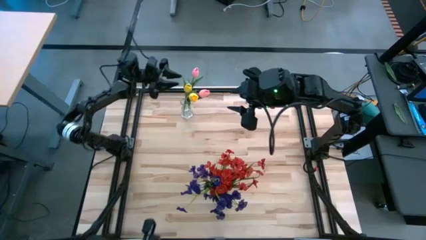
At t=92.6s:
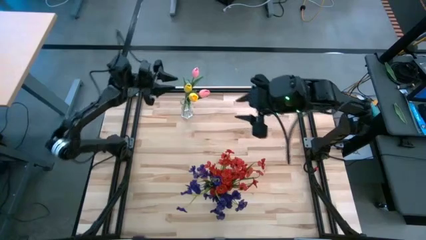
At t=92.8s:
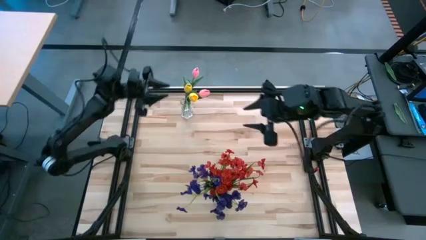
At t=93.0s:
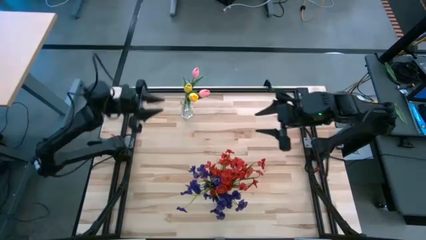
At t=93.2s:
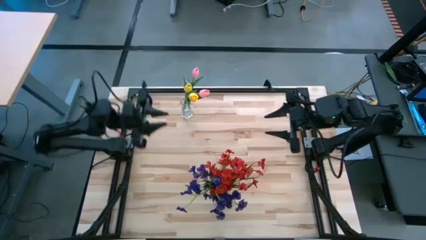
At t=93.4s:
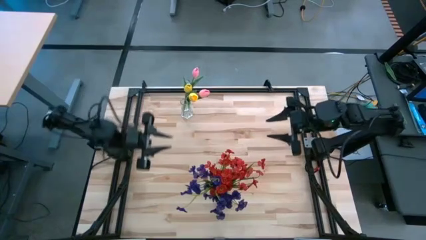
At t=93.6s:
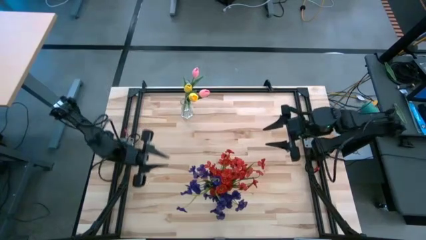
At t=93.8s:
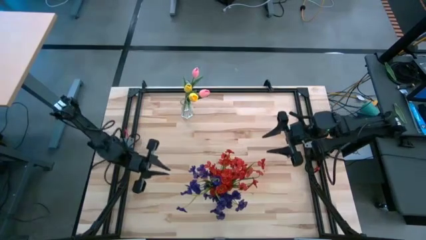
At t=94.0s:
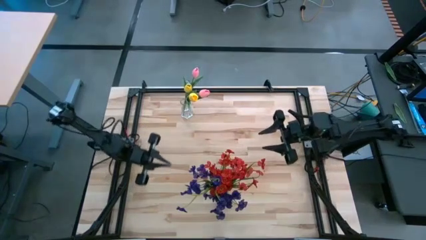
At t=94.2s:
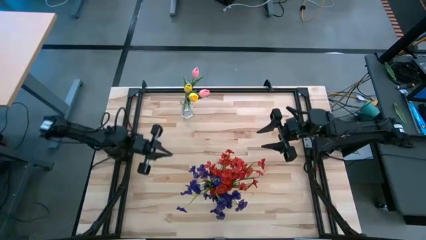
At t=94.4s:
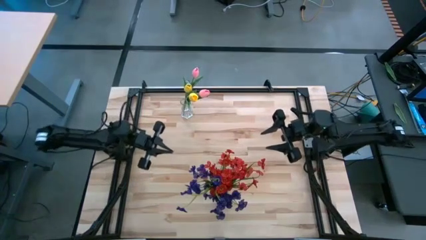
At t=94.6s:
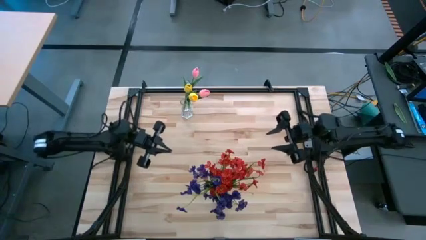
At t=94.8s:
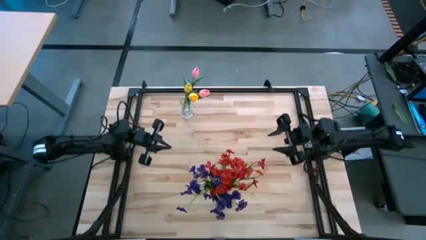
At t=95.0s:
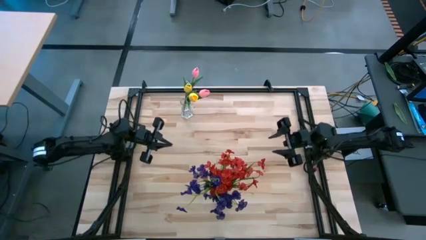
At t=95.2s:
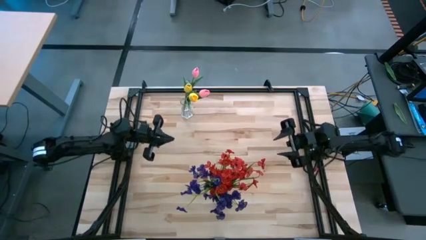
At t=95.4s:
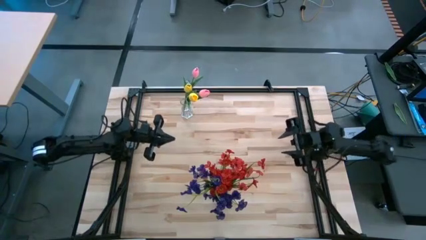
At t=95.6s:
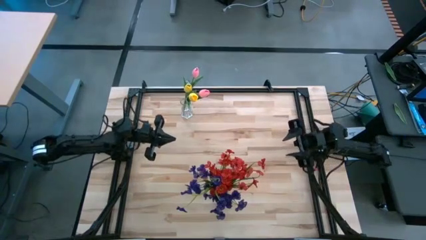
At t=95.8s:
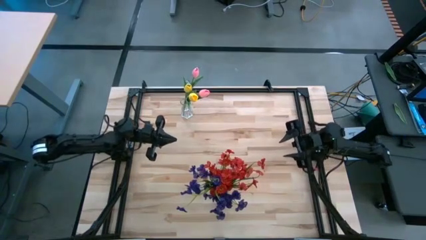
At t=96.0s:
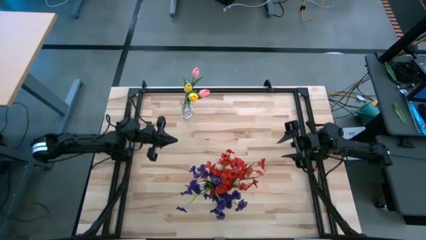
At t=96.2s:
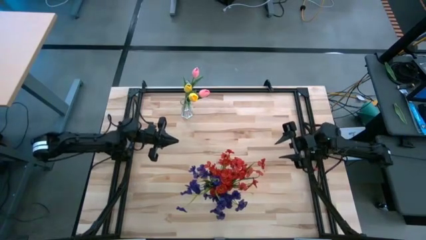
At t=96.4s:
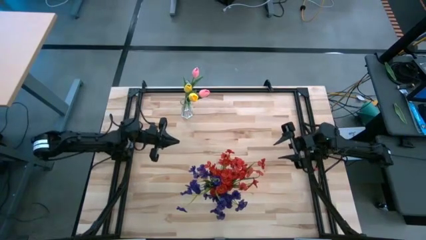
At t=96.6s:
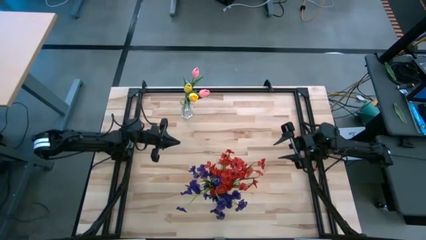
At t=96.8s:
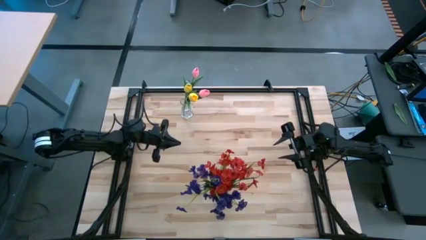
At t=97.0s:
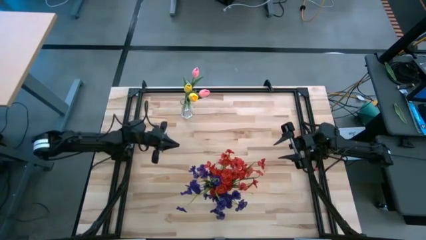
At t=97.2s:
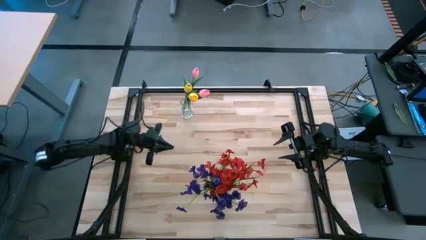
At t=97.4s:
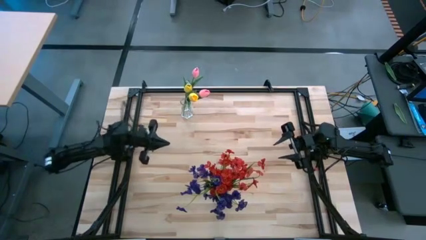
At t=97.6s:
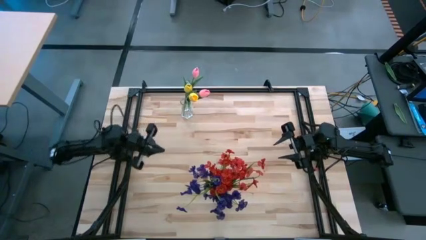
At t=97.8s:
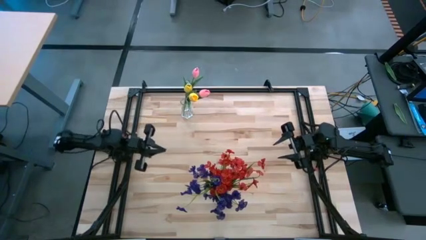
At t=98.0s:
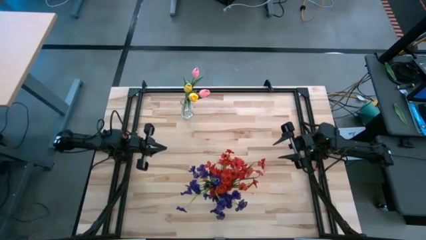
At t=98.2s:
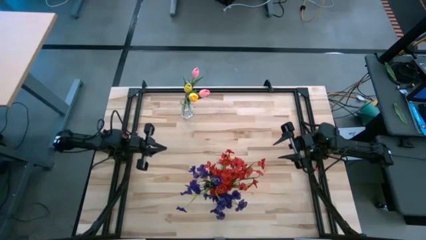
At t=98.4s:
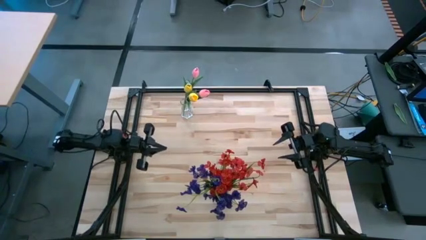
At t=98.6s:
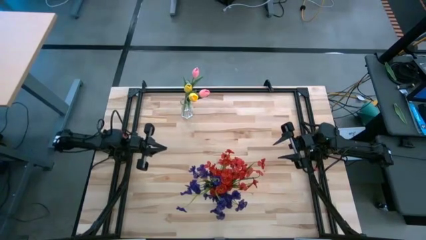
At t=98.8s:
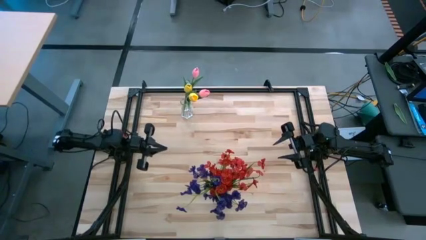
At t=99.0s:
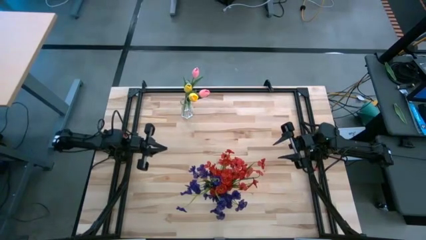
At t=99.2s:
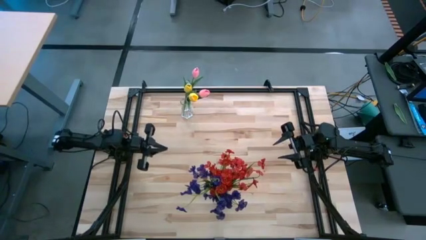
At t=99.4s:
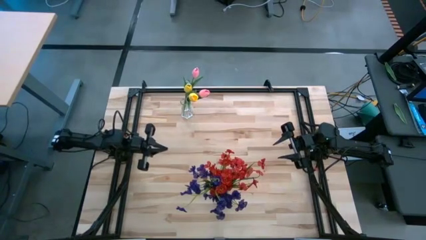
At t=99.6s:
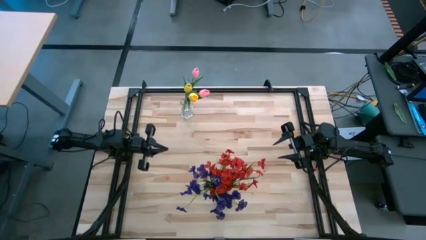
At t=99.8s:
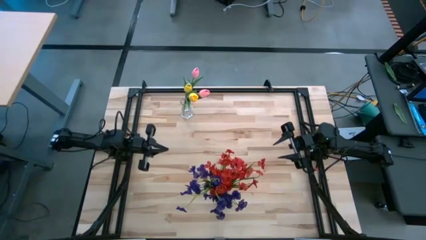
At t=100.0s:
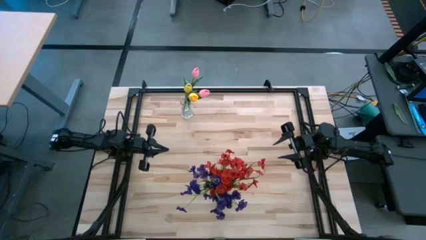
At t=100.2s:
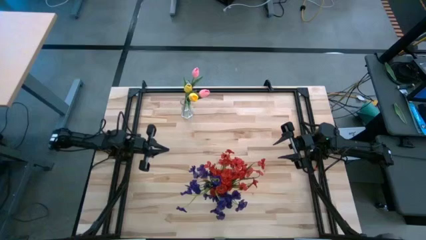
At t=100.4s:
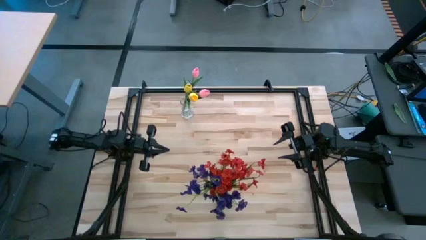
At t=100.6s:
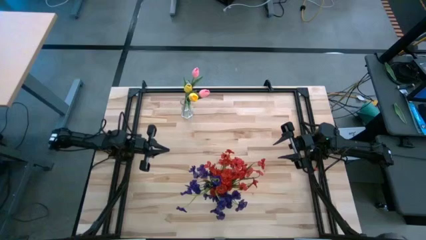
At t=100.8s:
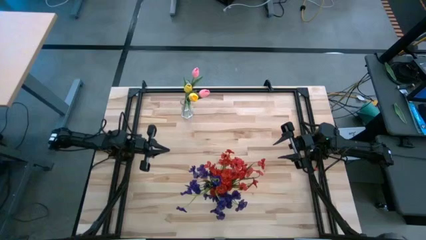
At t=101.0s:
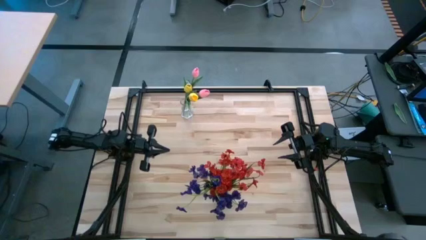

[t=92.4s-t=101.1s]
Task: Sort flowers into vase by color
Return to Home Position

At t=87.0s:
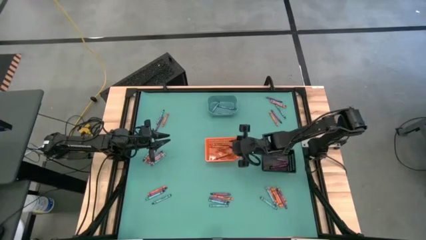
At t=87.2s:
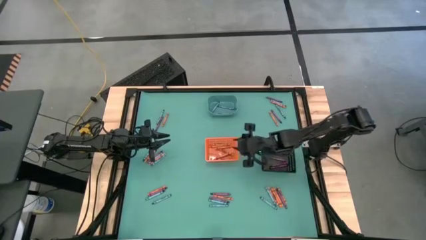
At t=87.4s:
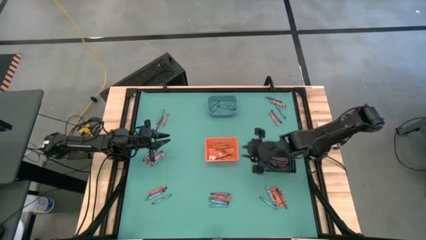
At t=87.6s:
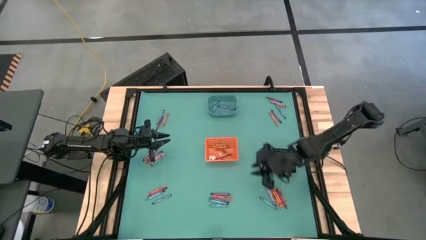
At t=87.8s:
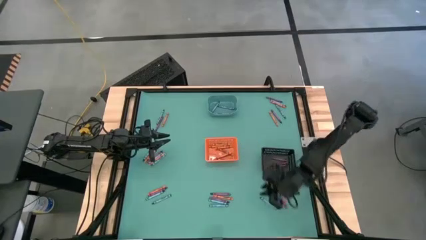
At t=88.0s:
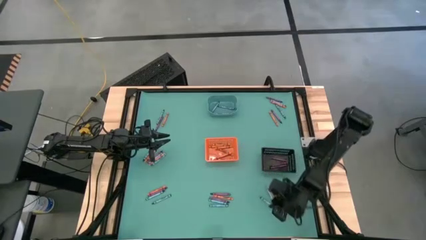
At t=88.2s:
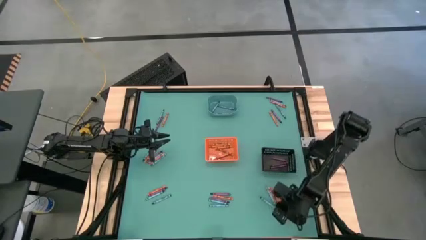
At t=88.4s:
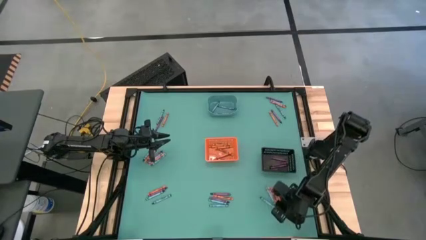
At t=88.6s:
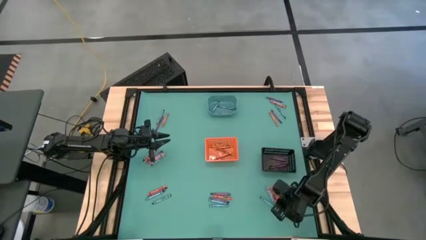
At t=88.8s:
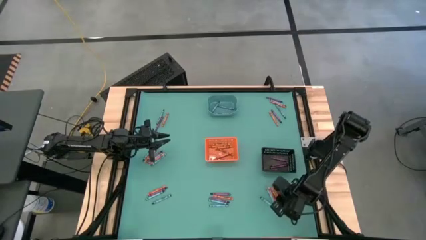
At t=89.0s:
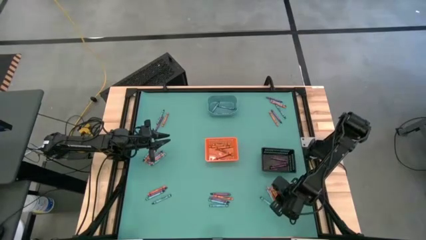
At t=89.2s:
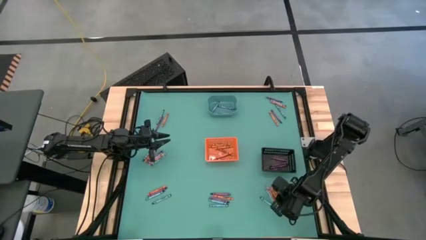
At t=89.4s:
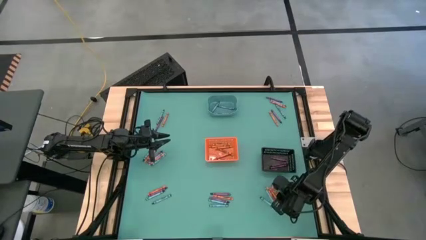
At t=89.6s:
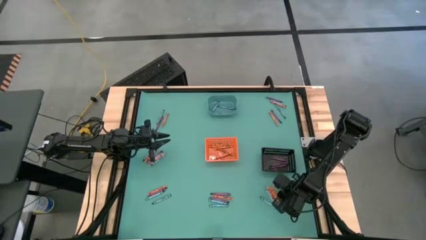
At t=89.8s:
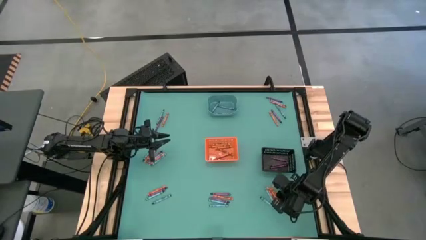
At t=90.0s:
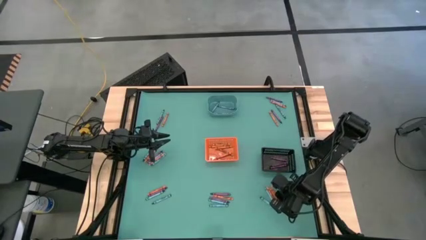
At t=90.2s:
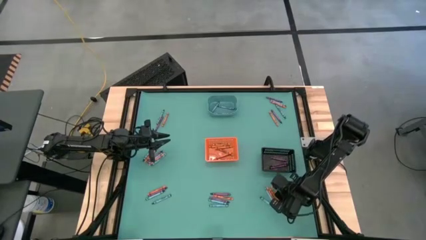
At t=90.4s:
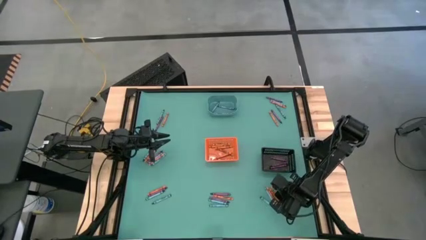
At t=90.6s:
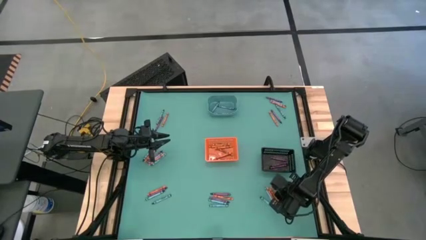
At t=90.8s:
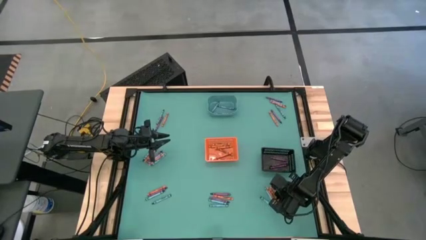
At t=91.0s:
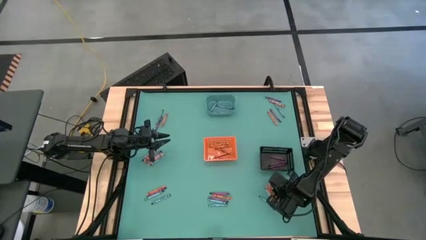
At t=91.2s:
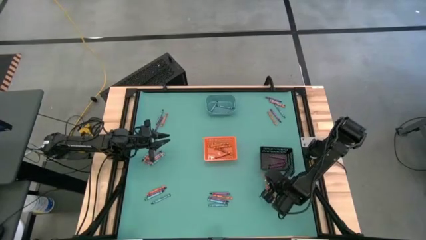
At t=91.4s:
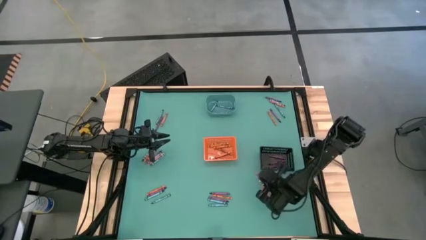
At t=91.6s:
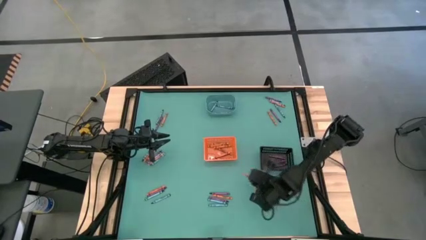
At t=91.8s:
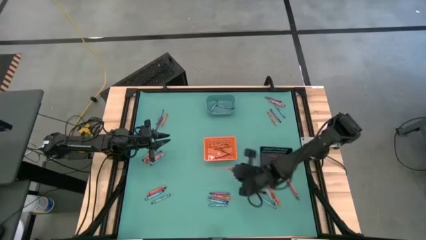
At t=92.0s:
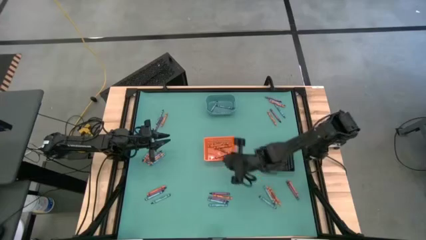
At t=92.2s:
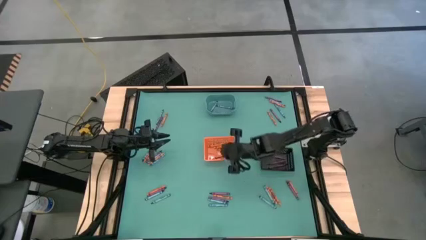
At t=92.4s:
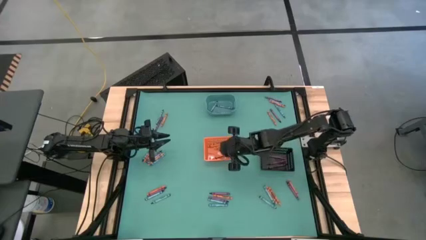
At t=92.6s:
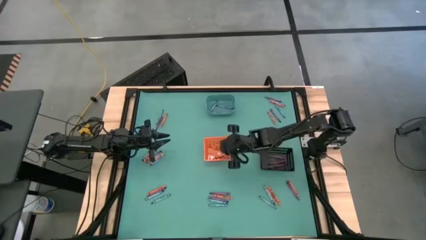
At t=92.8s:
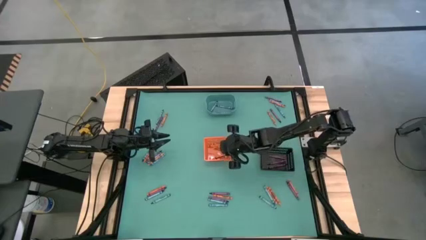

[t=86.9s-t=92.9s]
Task: Sort crayons
Put the orange crayon into the orange bin
